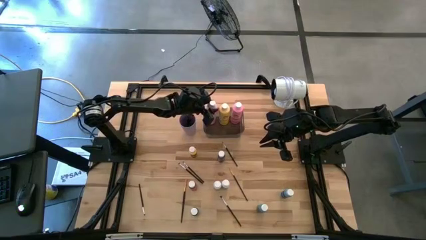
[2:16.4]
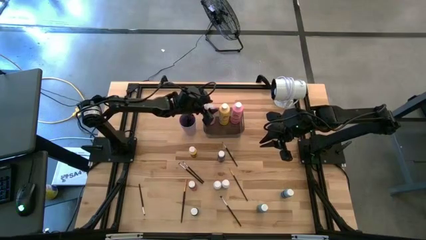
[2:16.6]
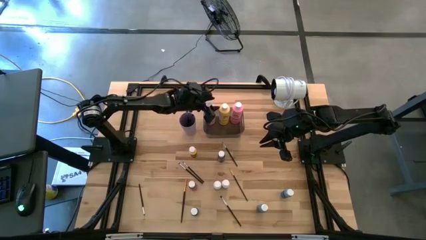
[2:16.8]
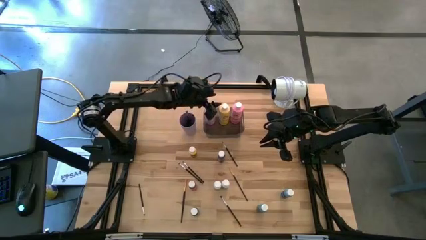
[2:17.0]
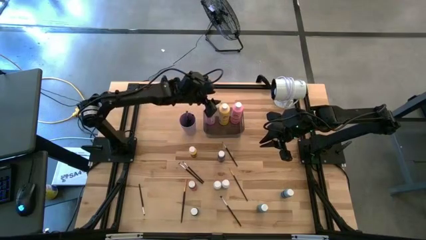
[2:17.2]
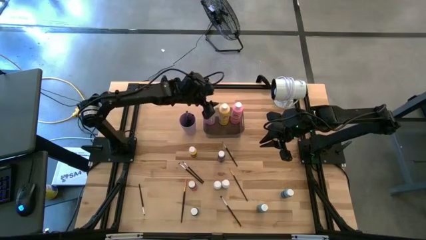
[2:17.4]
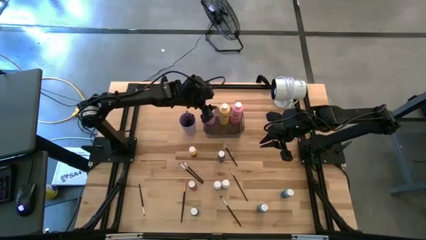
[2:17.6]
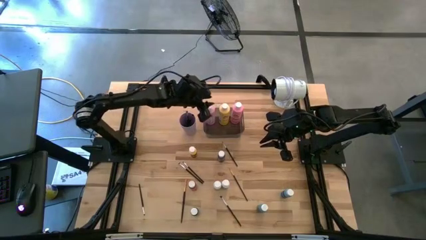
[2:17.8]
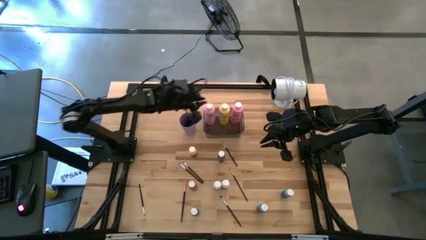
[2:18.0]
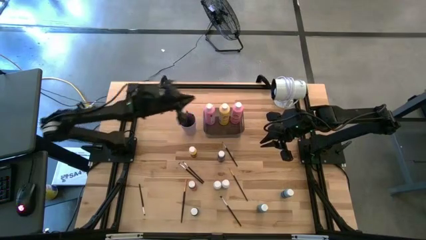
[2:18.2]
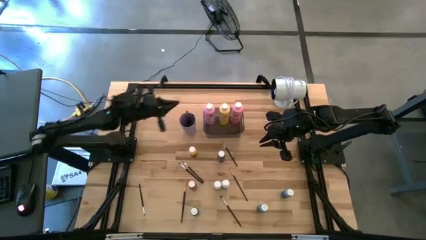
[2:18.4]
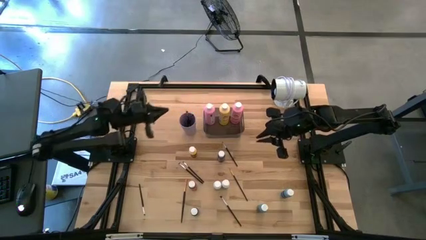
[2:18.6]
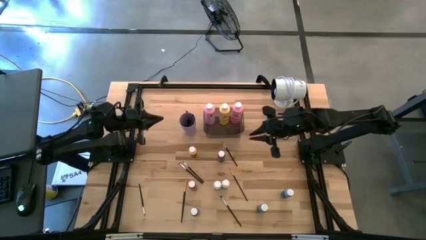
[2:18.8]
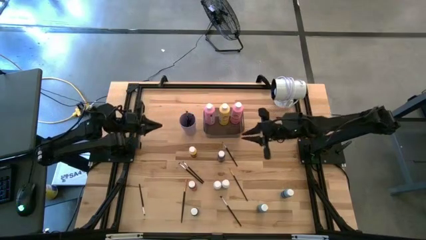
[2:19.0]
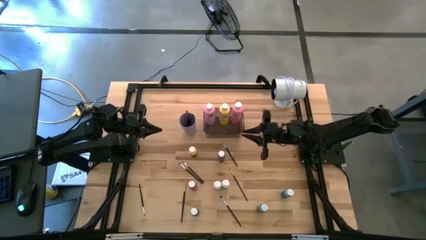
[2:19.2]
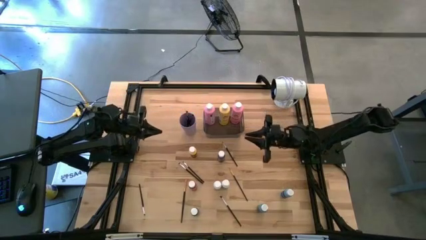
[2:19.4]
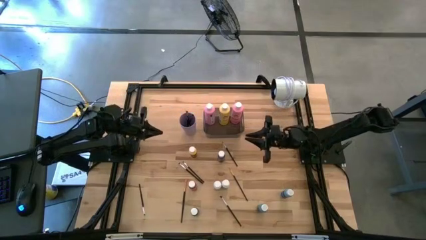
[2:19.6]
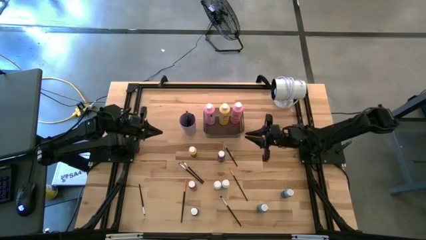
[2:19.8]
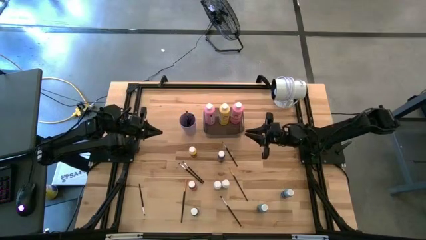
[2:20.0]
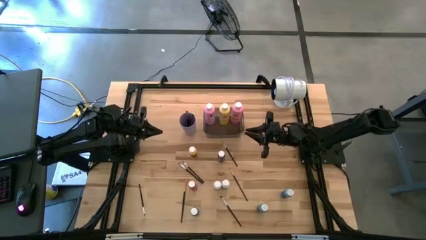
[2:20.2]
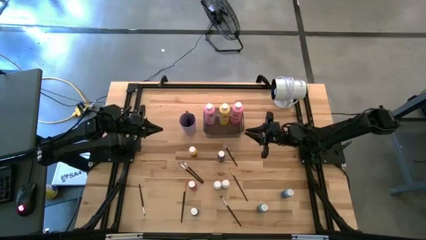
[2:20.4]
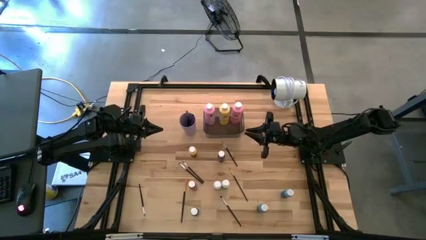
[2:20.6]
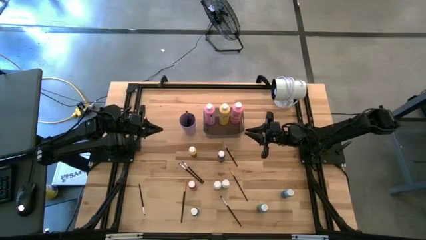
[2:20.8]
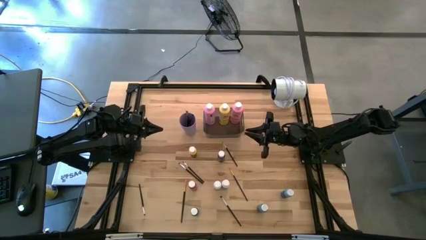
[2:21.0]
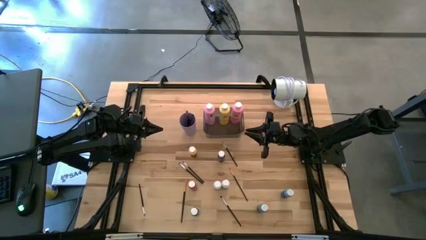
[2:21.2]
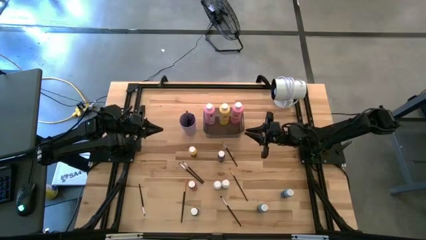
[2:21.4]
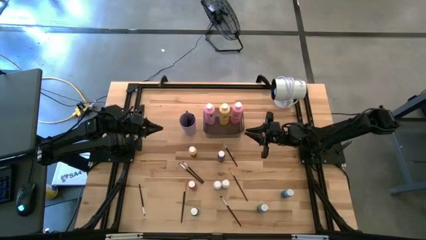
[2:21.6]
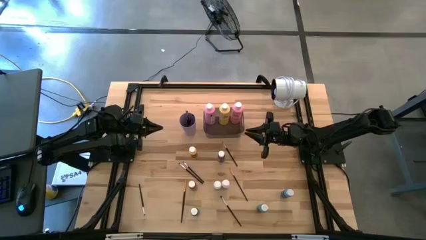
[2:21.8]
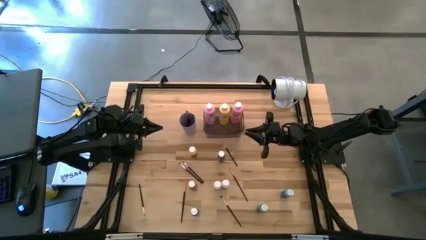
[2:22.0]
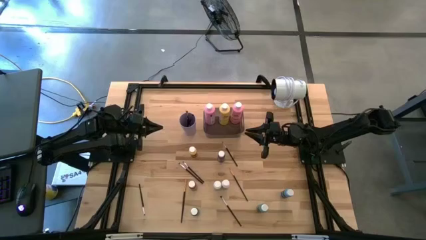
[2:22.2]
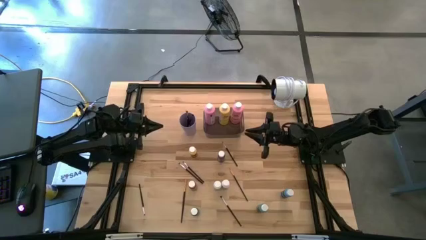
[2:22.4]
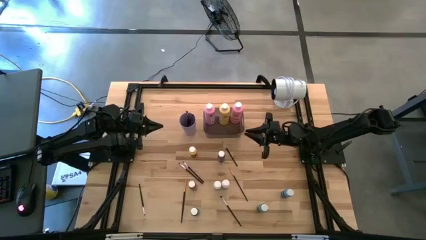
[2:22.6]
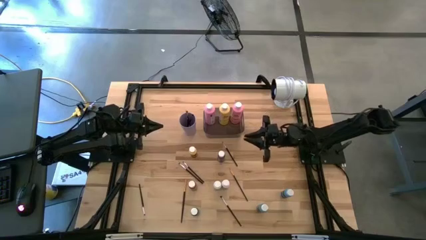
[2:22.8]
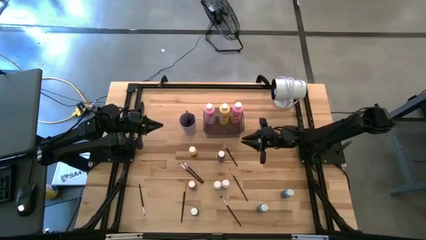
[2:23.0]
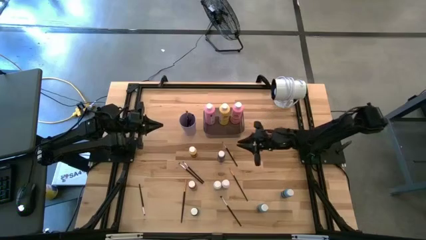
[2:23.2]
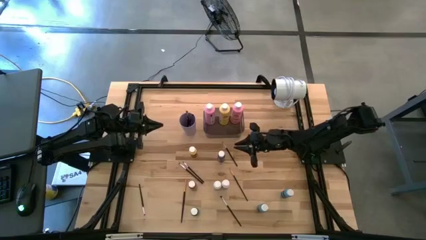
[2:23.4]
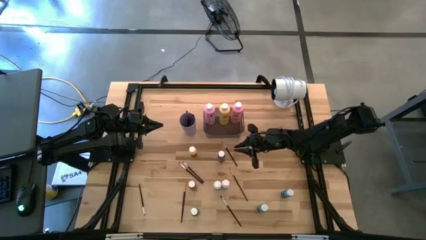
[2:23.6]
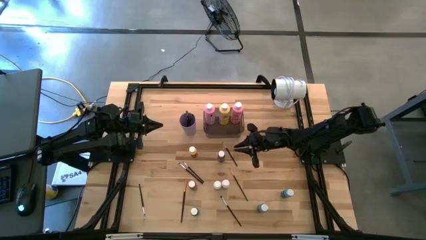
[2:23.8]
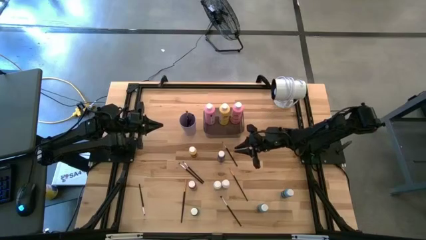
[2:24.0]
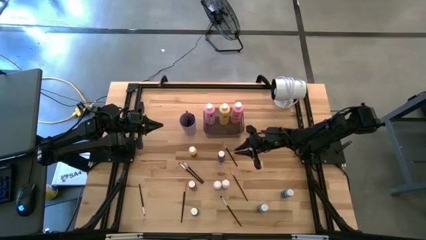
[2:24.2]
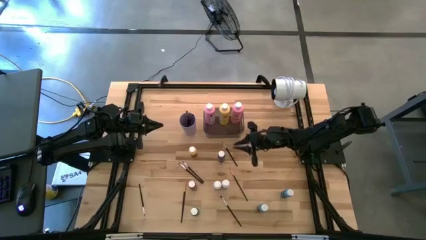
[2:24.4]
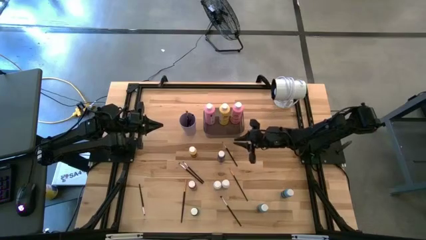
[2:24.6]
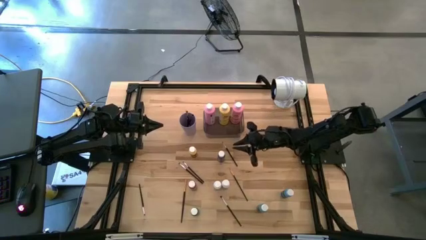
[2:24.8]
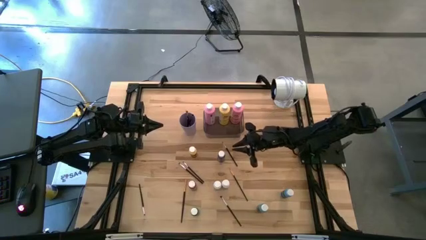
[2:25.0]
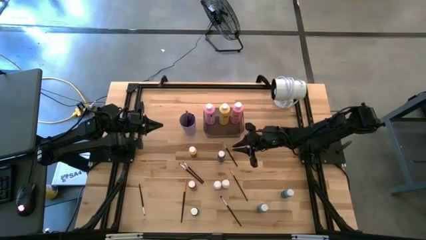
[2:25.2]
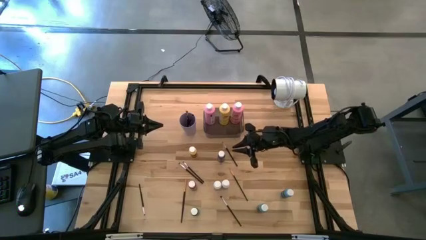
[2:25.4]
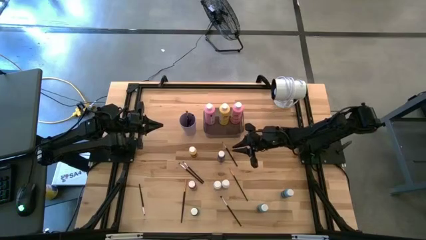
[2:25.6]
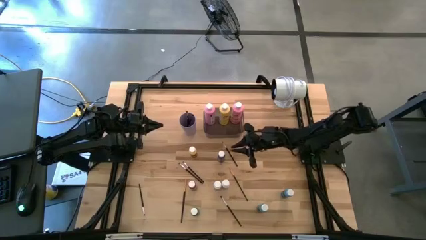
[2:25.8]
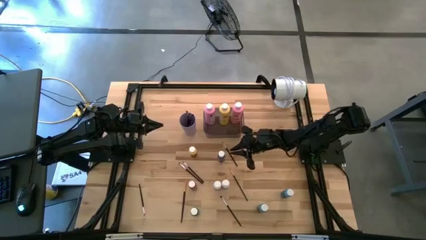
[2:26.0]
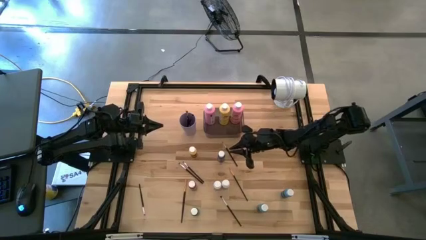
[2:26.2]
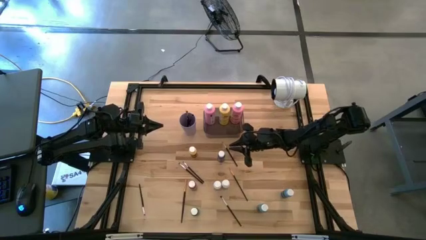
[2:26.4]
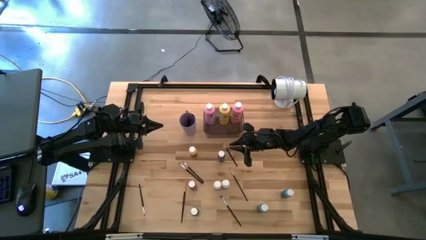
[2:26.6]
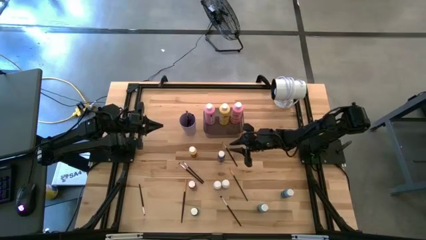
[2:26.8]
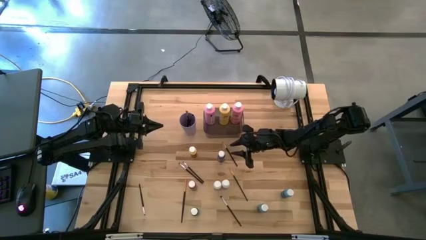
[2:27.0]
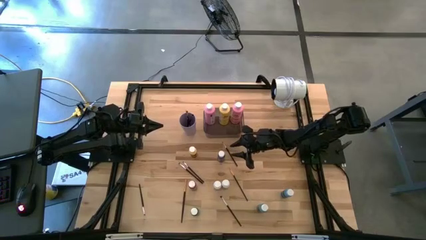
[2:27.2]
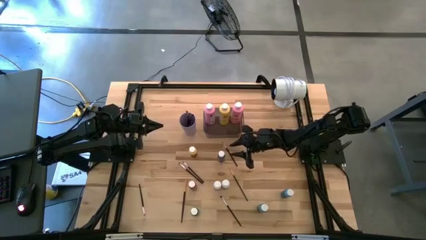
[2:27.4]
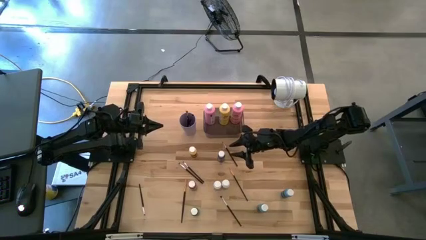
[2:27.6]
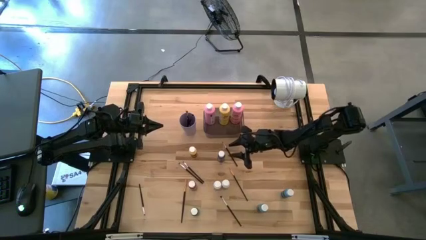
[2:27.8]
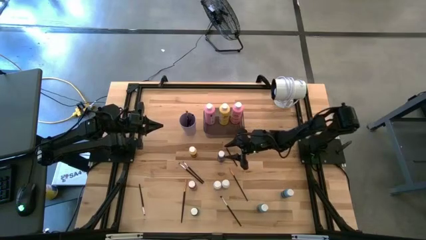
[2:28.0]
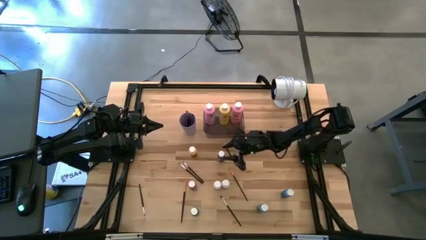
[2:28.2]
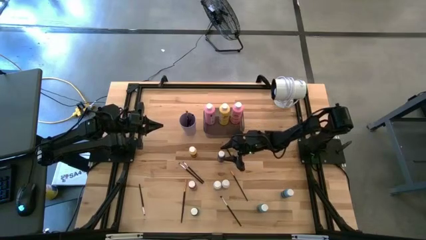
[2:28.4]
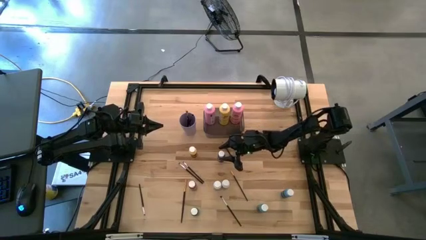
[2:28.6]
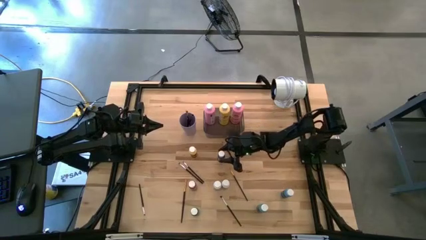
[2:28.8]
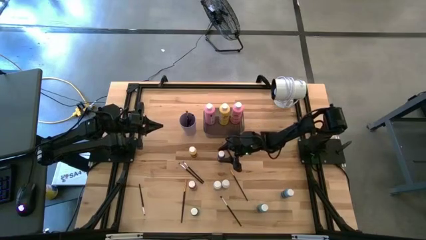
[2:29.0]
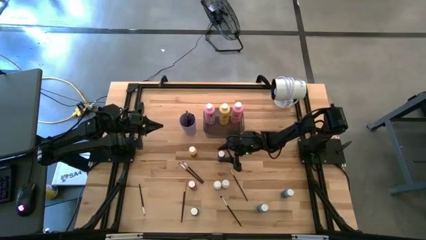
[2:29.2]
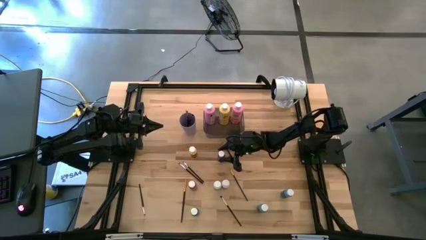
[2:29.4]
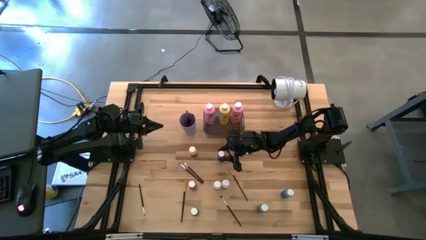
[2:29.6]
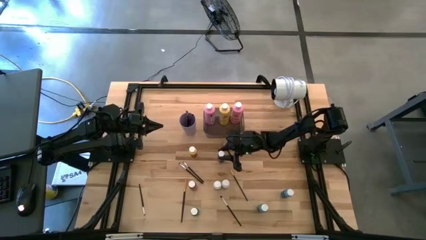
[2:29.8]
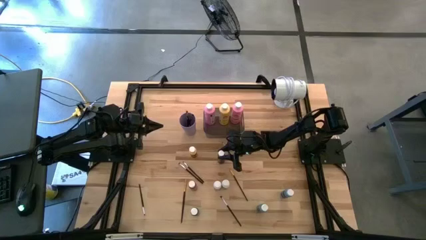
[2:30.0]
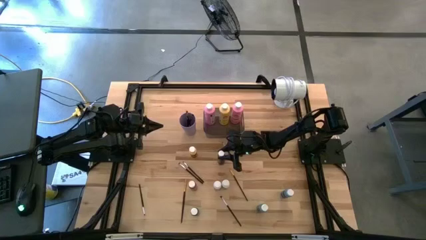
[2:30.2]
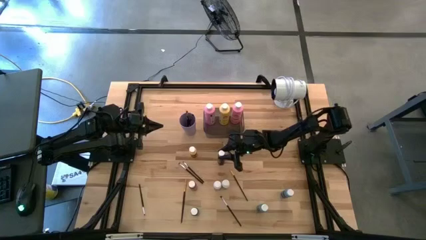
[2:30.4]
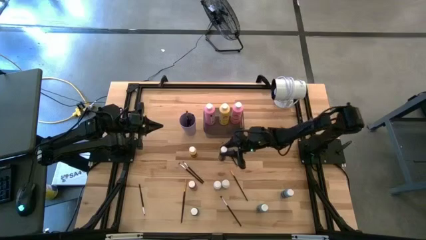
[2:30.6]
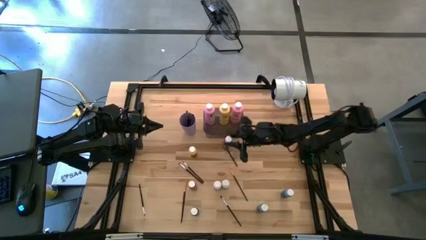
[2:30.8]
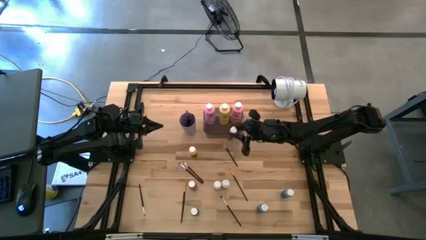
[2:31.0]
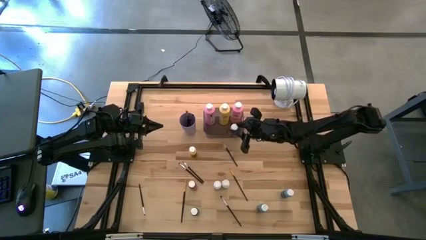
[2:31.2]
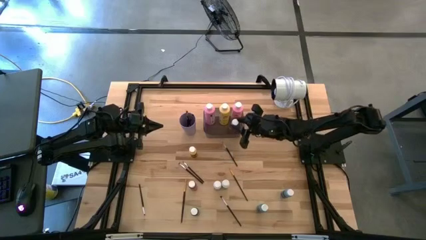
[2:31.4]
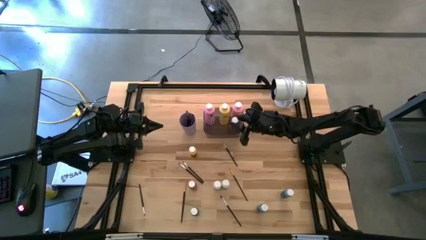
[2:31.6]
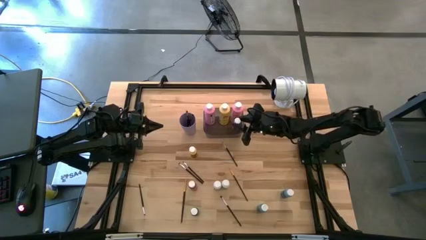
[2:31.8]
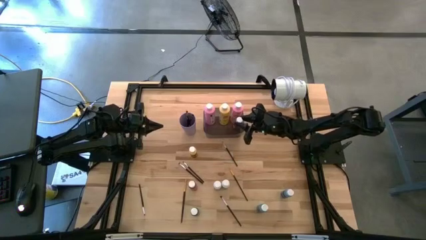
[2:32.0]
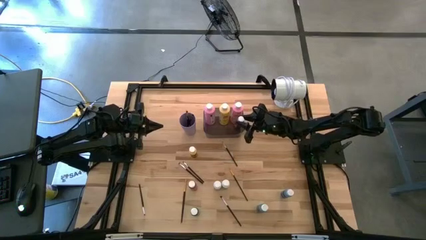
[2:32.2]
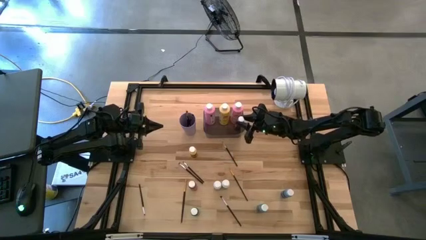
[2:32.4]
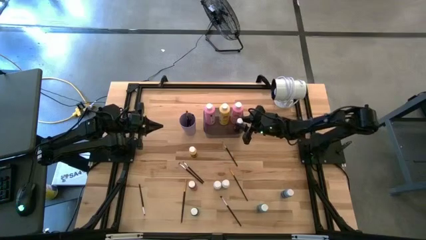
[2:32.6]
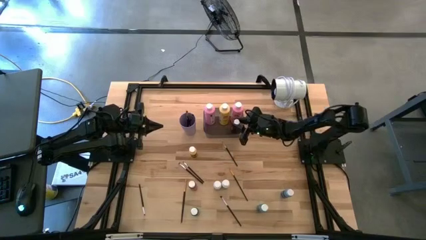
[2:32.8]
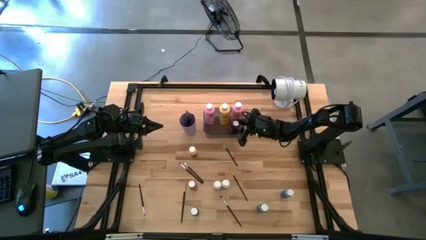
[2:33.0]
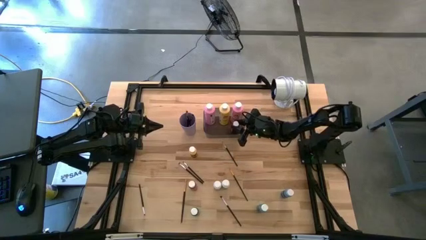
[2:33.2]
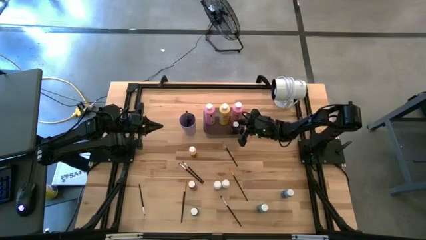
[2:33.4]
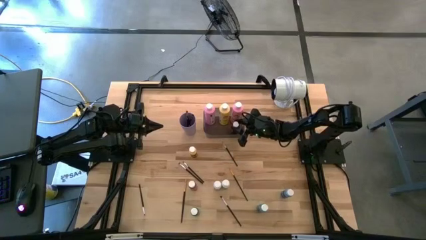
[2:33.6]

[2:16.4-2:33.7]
Task: Pick & Place Paint Supplies
Put the small blue paint bottle into the gray bin
